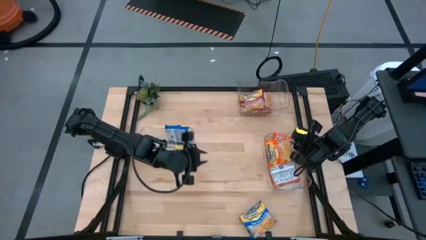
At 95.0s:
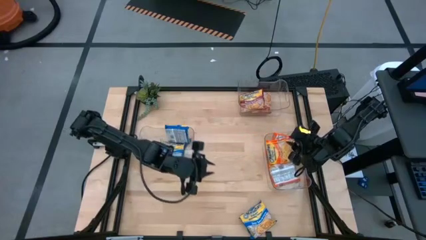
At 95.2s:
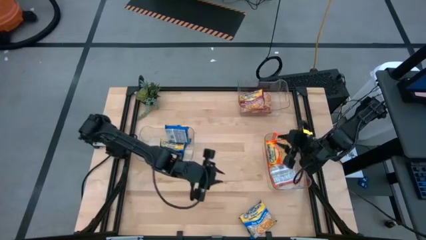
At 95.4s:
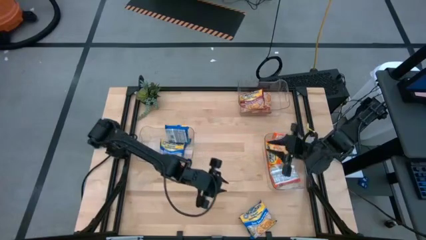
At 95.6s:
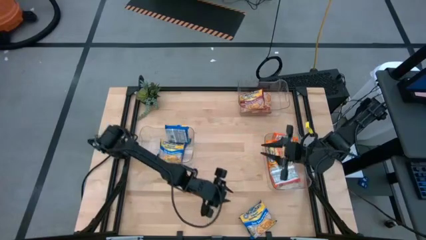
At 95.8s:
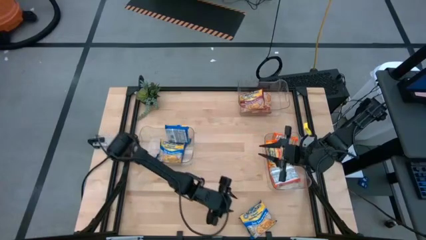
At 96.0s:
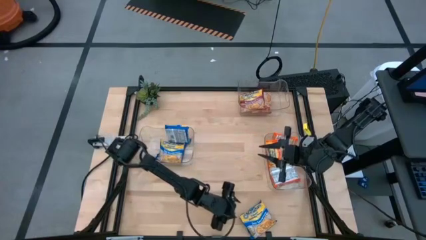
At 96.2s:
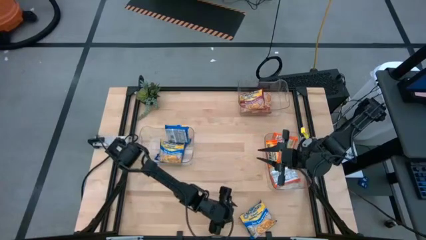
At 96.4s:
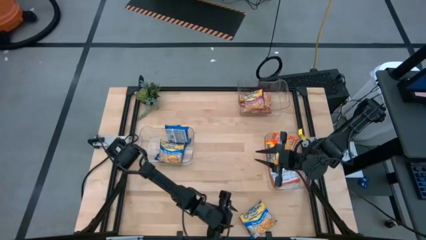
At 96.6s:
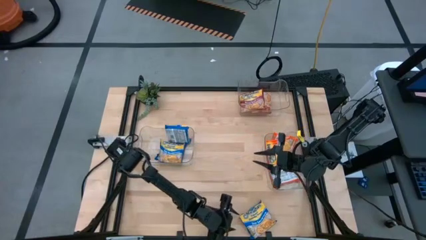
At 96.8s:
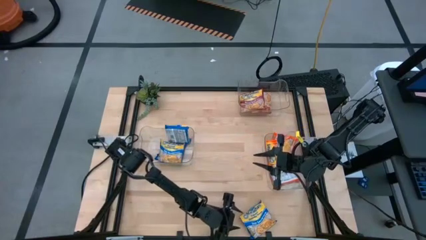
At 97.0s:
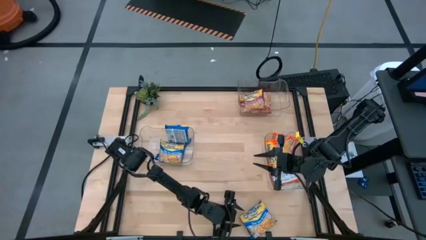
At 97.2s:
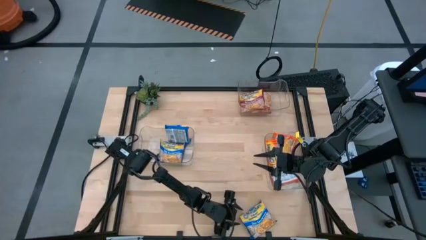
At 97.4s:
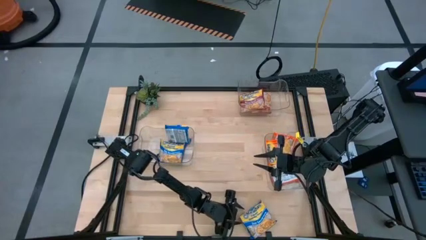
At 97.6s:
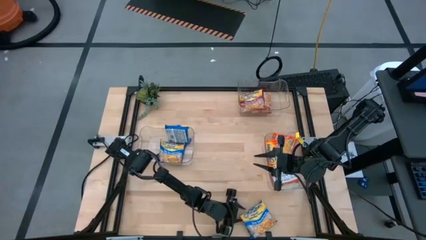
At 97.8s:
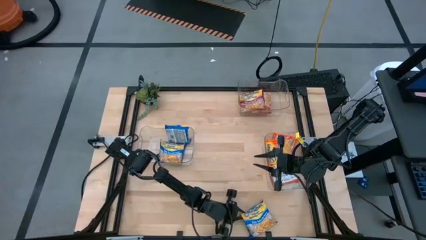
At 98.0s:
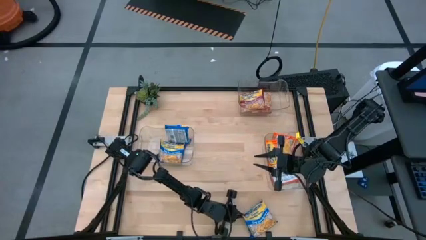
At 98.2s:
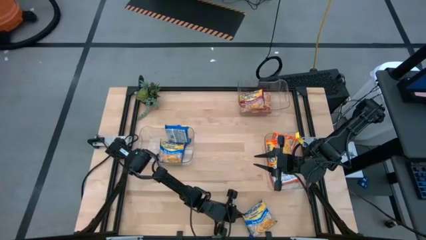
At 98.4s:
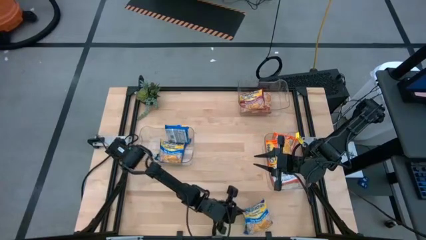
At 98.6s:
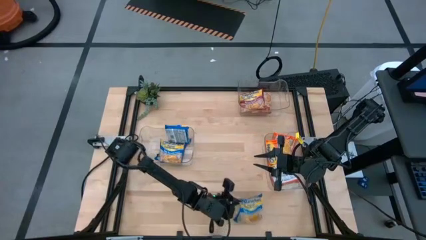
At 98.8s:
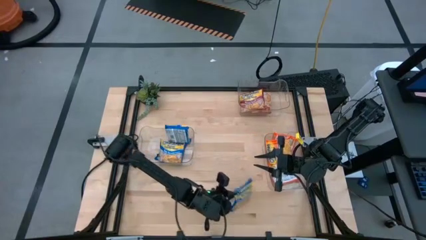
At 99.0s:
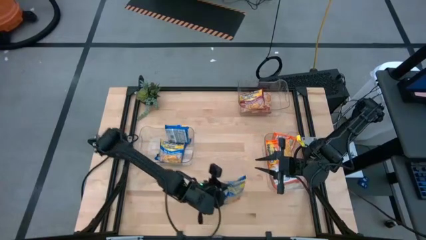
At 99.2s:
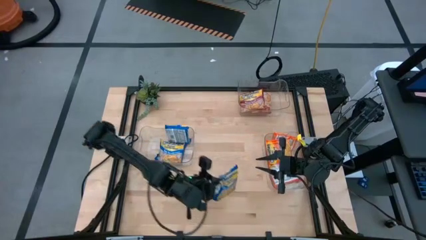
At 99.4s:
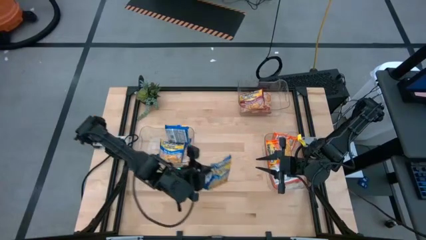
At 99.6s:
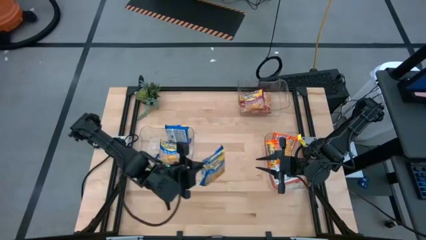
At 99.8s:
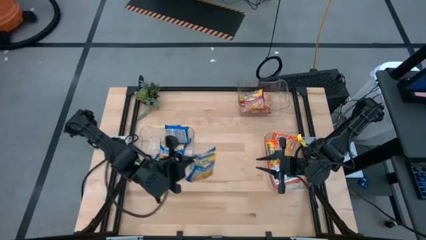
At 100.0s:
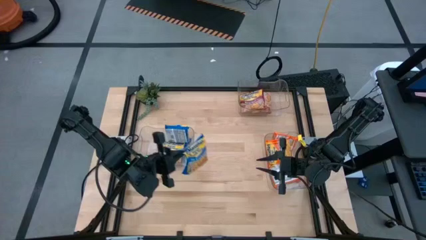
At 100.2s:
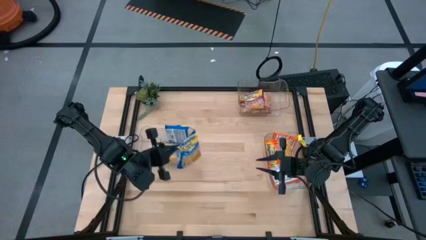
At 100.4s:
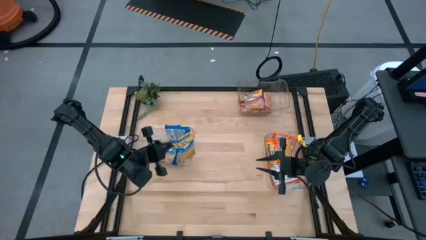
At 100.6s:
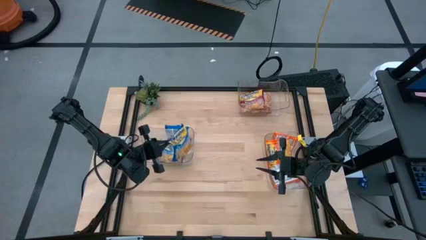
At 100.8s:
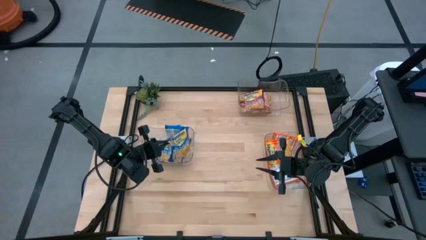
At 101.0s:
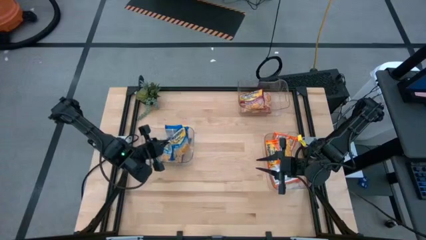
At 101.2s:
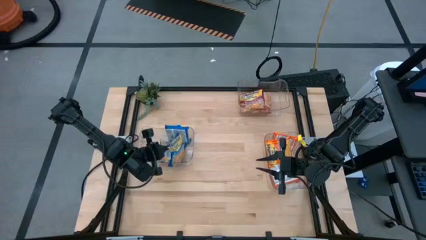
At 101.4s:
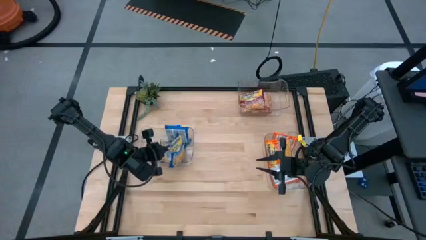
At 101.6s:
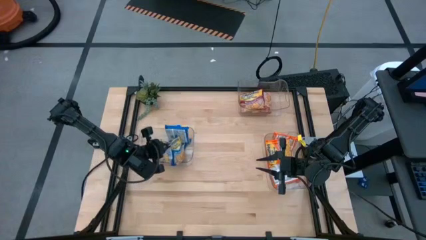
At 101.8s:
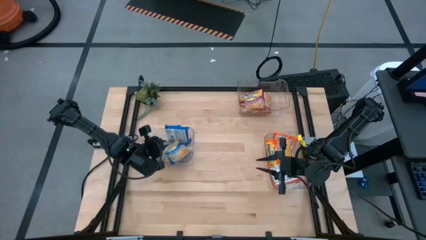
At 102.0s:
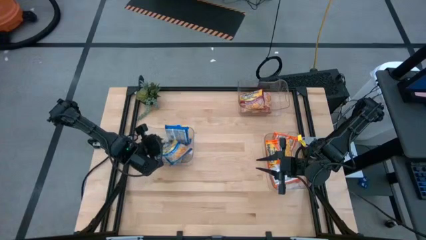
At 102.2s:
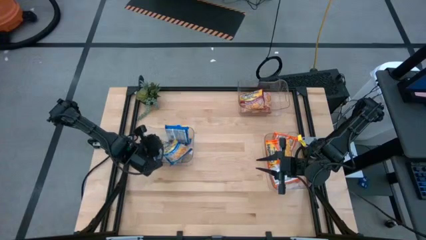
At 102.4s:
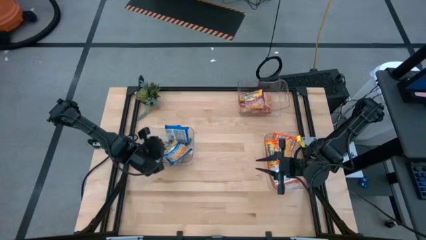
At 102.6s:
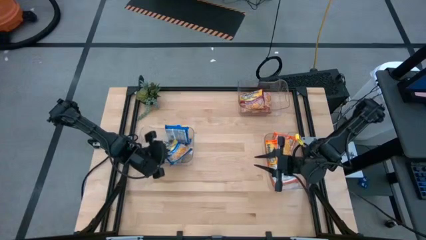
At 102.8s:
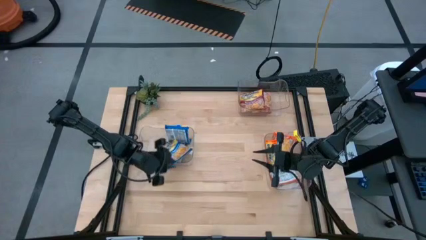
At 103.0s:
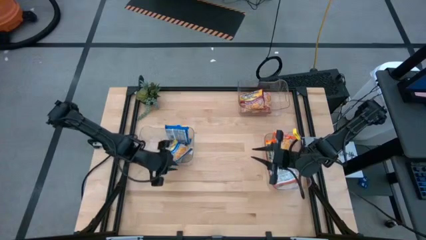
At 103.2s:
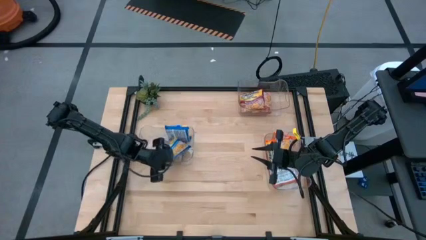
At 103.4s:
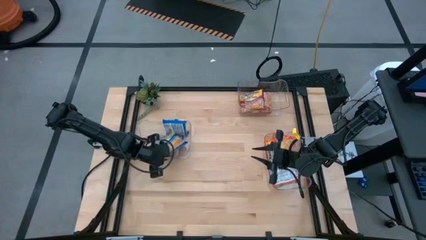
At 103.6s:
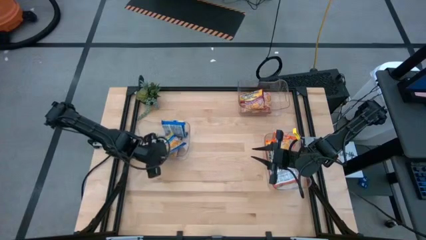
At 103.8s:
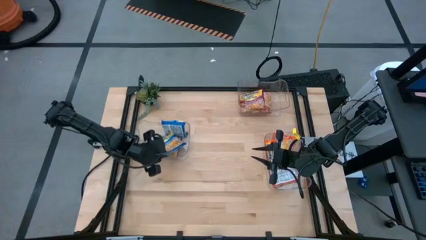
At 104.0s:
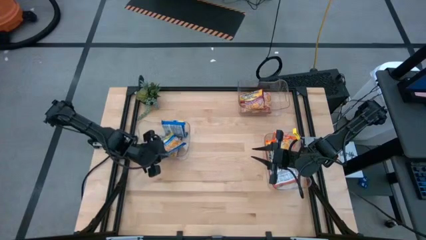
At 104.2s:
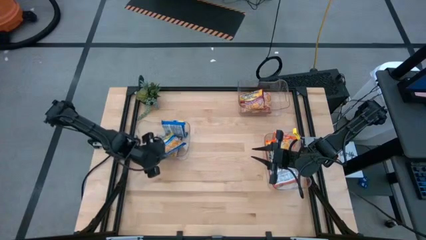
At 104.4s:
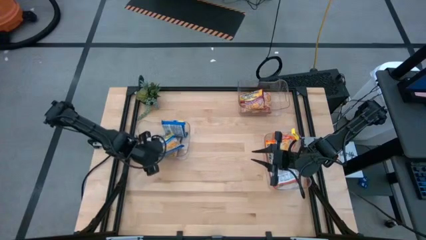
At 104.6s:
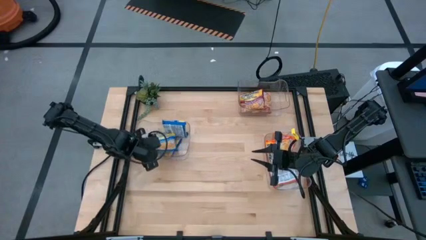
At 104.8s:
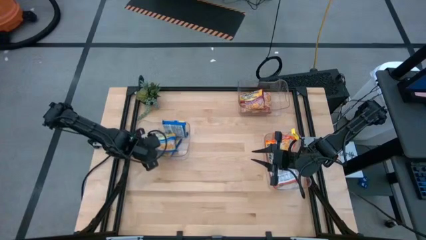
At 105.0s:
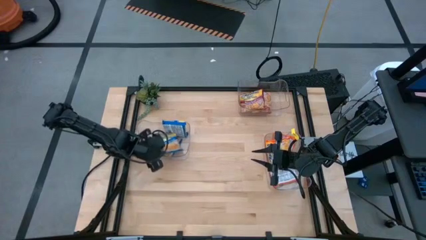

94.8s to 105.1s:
Task: Sort Maruchan noodles
Put the blue noodle pack into the bottom left transparent bin

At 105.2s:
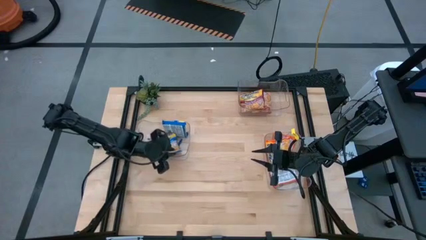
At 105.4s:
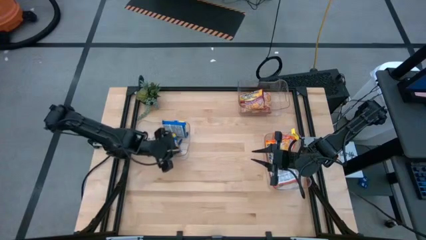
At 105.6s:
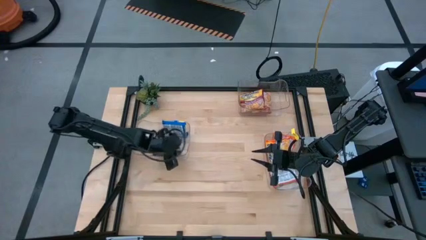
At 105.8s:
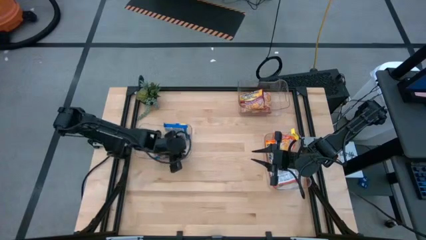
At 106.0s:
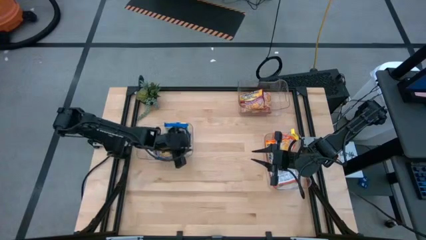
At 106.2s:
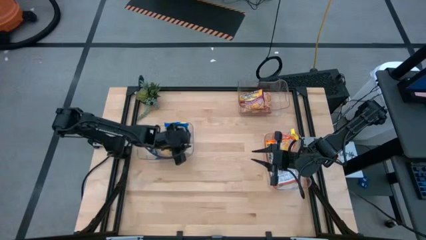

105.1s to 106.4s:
Adjust the bottom left transparent bin

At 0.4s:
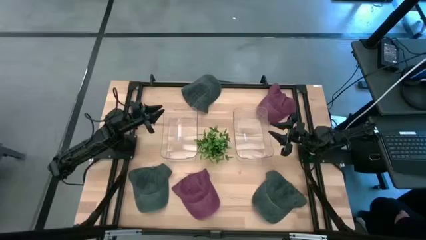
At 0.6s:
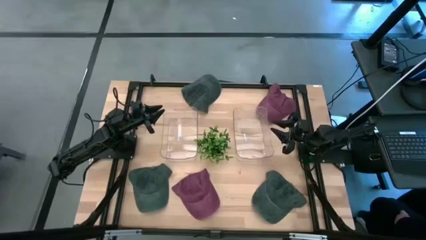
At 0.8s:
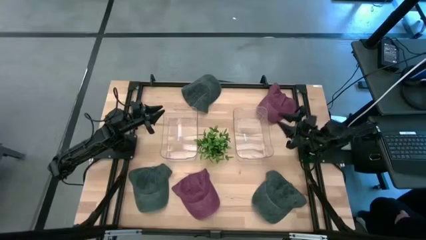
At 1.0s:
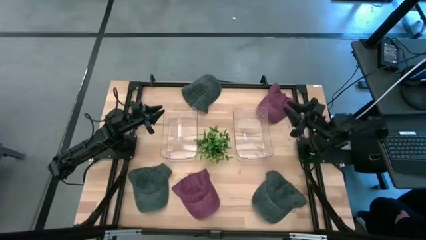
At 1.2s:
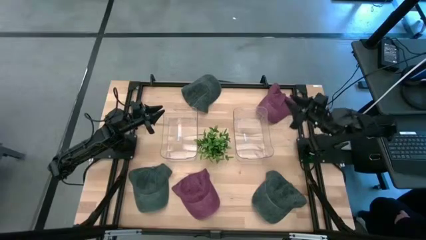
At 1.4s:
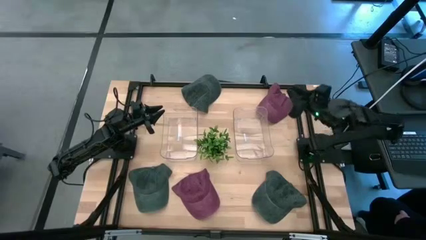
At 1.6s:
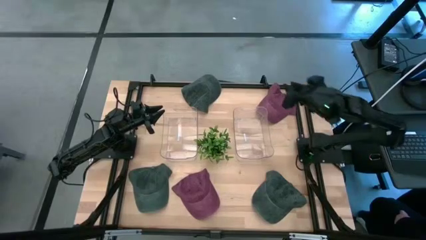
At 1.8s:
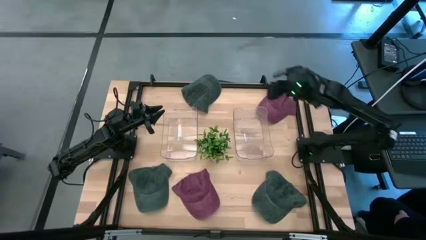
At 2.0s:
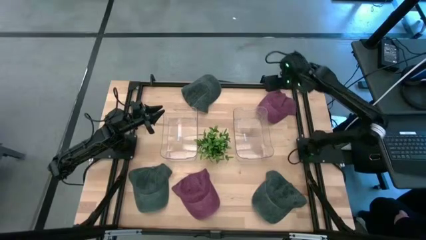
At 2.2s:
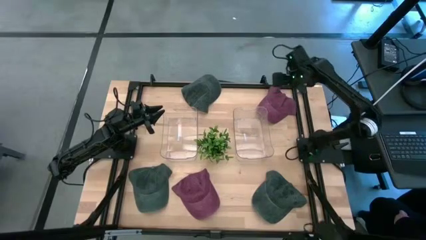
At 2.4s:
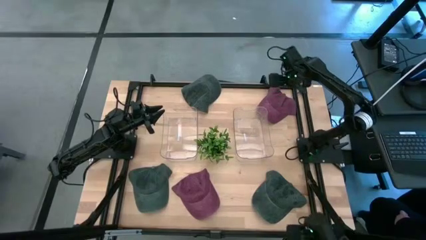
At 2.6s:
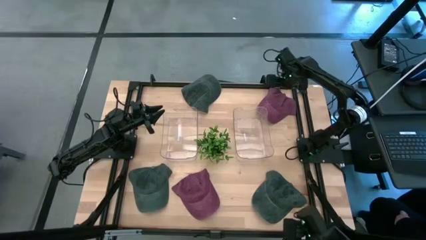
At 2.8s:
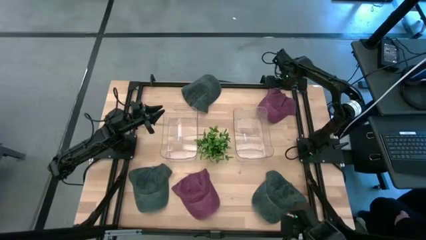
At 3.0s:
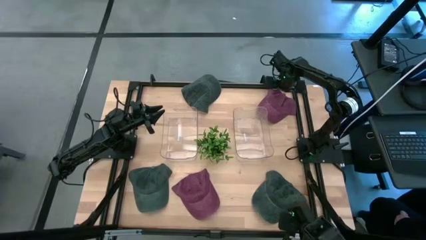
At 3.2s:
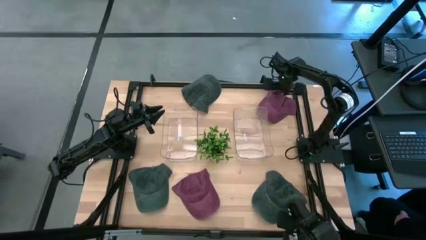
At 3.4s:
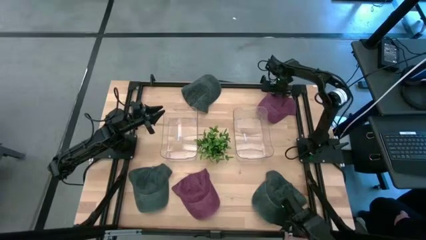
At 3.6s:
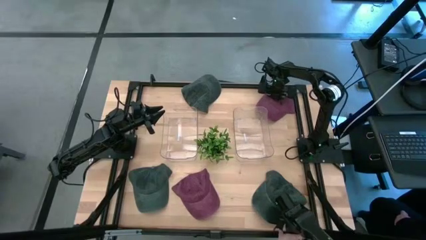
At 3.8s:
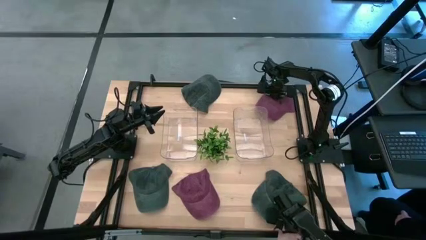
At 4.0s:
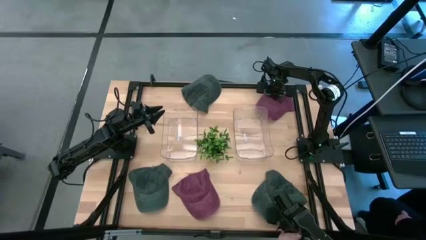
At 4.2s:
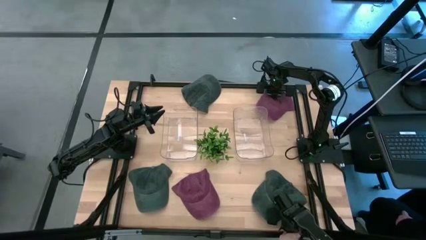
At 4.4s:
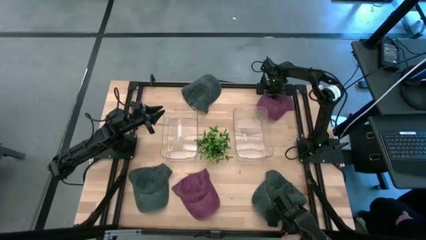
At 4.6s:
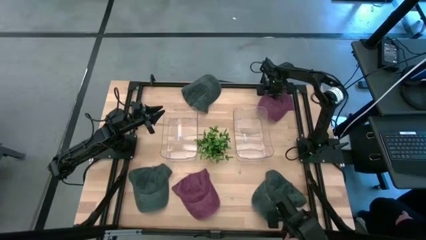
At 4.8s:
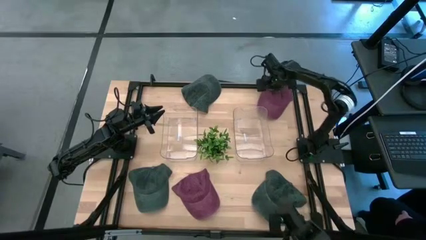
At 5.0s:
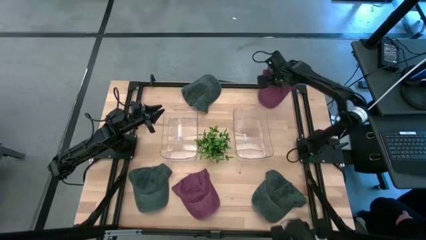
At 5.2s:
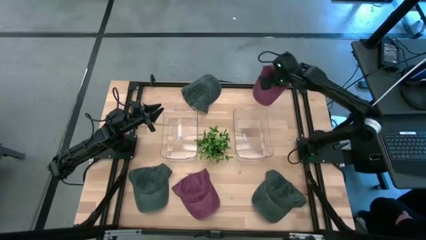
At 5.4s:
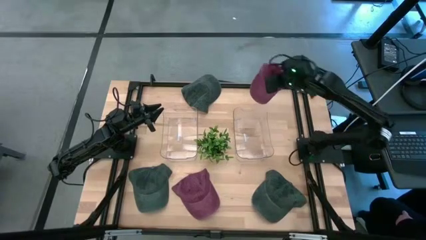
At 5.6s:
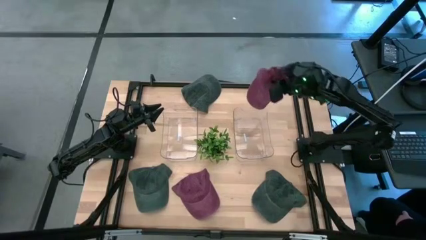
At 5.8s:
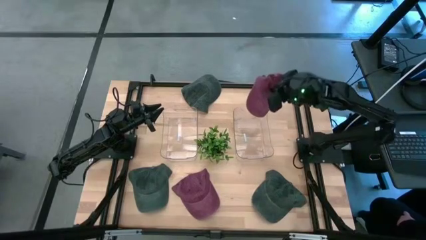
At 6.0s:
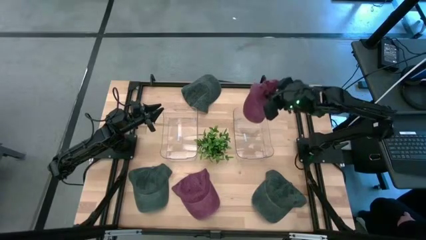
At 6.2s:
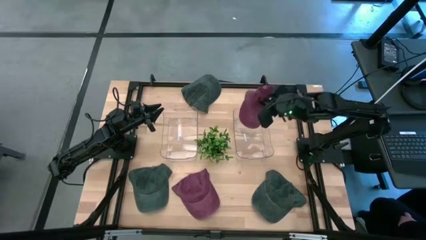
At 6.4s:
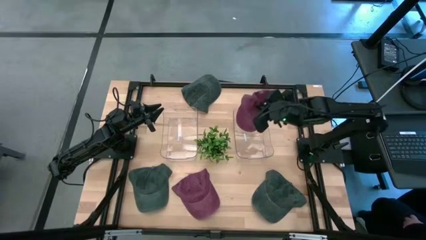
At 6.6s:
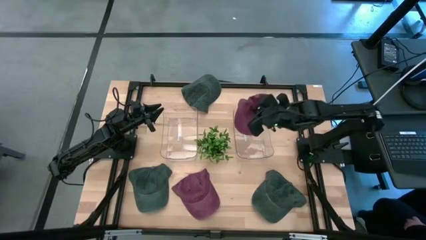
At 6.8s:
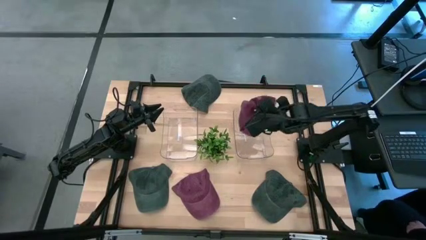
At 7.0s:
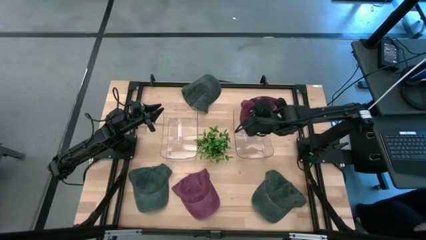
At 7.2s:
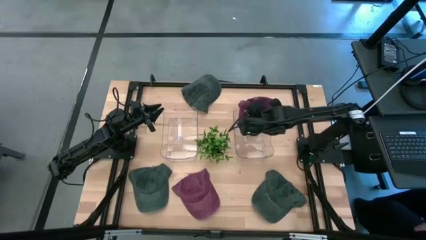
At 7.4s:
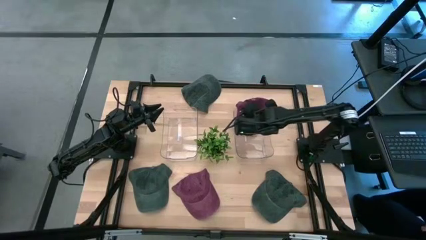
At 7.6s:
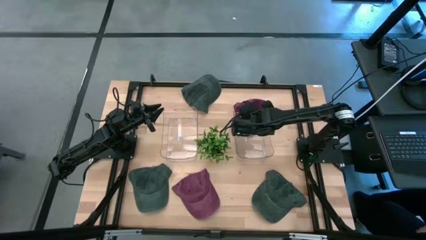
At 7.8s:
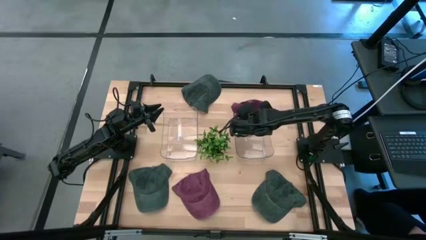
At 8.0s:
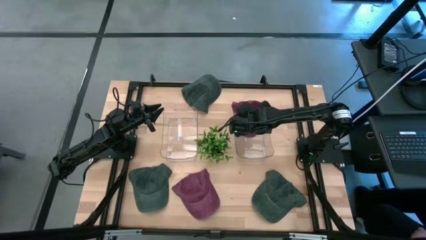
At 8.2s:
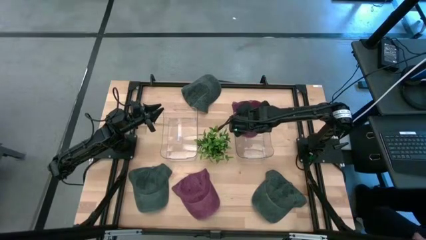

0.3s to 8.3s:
Task: Pick & Place hat
Put the top red cap into the right transparent bin
